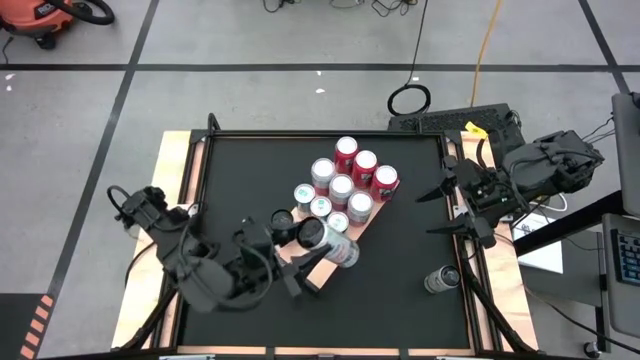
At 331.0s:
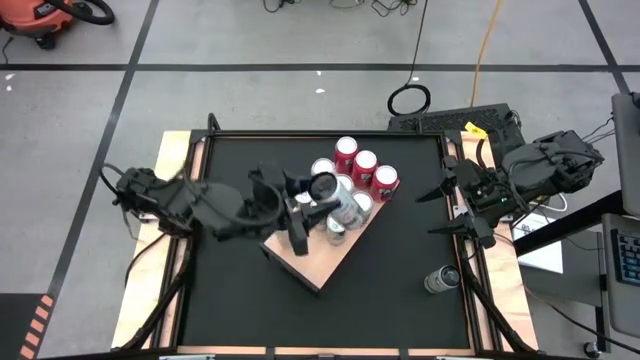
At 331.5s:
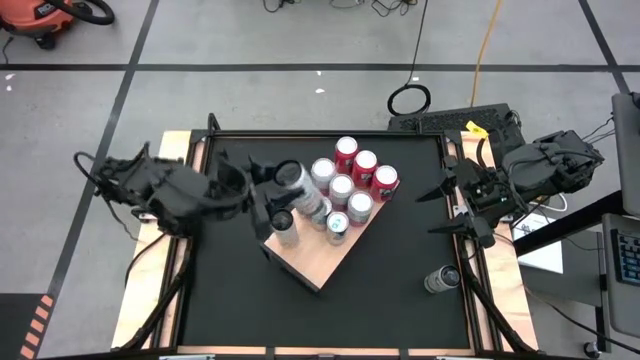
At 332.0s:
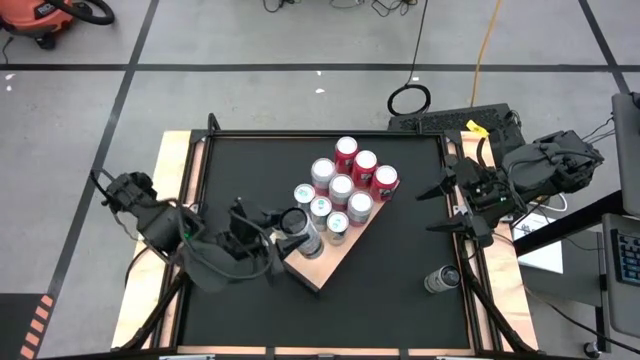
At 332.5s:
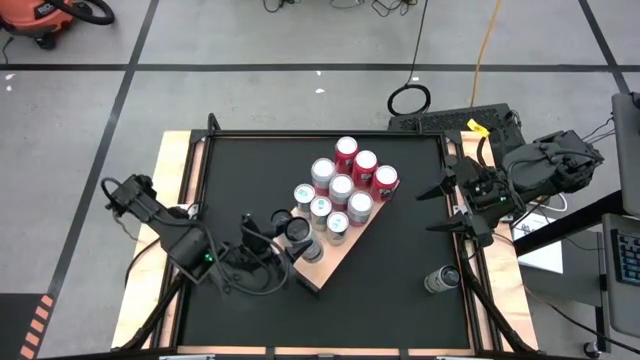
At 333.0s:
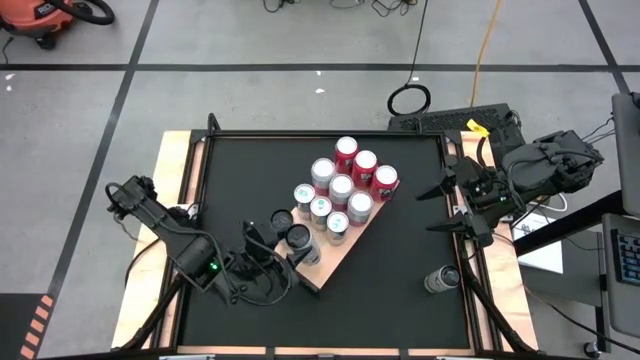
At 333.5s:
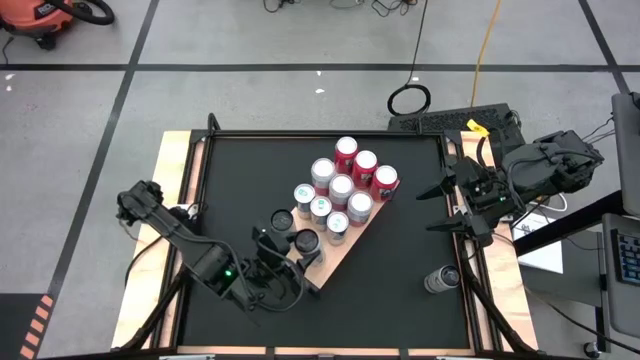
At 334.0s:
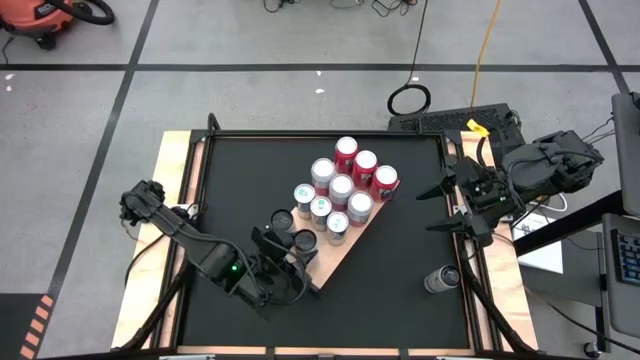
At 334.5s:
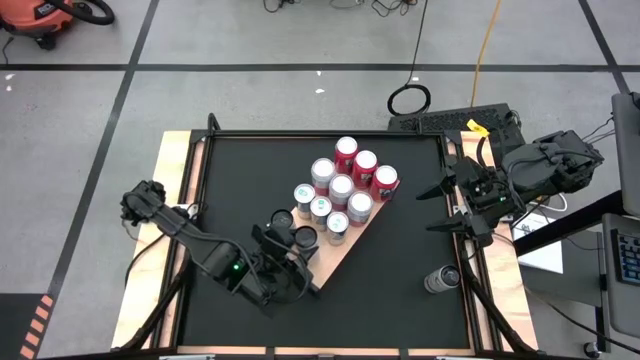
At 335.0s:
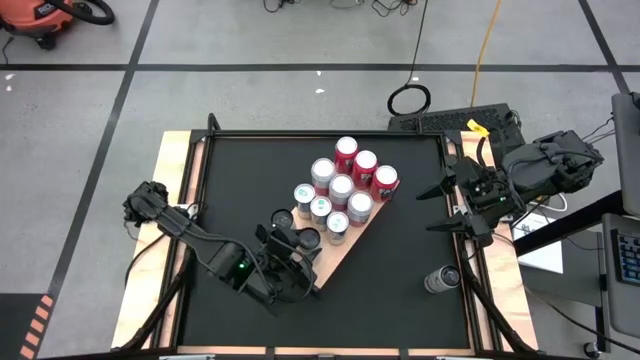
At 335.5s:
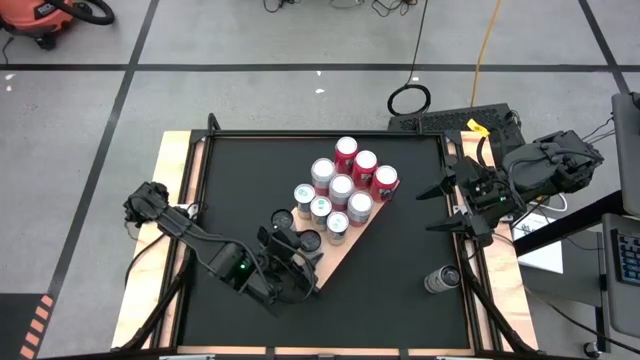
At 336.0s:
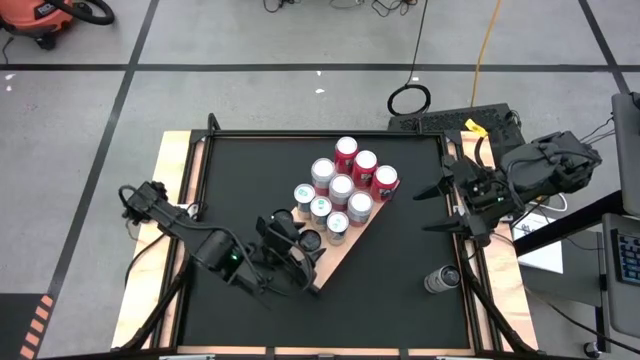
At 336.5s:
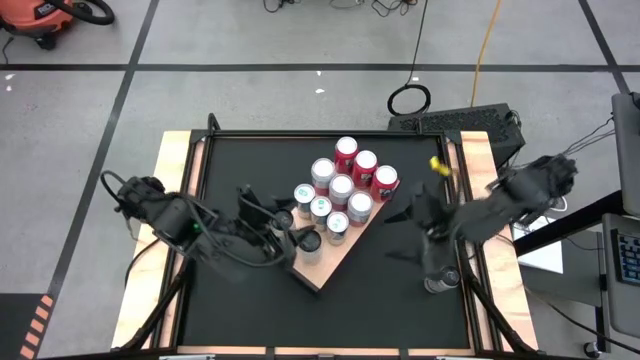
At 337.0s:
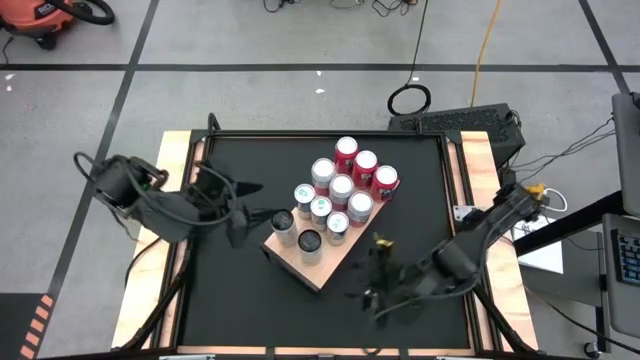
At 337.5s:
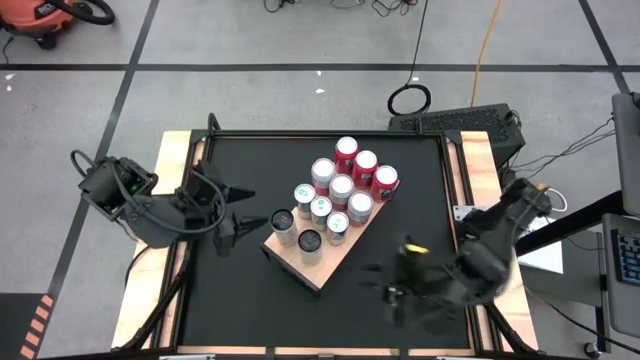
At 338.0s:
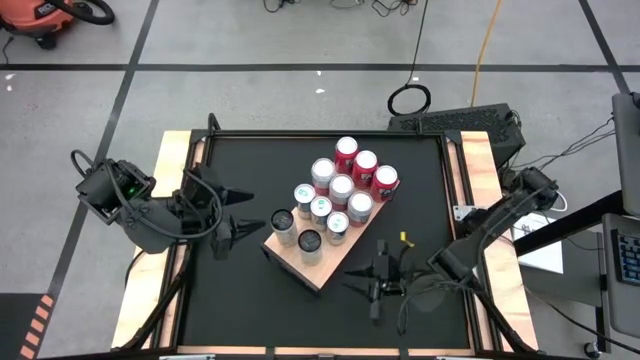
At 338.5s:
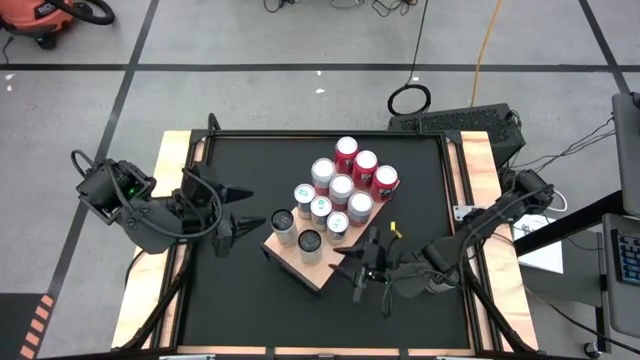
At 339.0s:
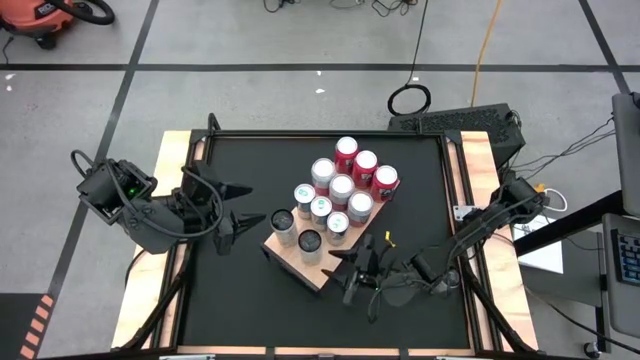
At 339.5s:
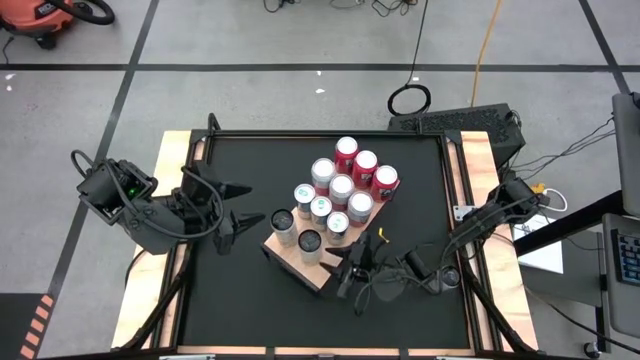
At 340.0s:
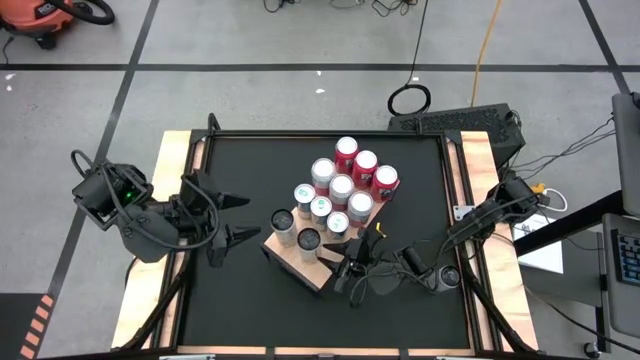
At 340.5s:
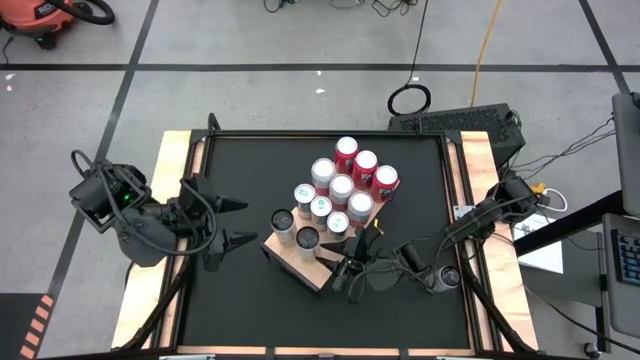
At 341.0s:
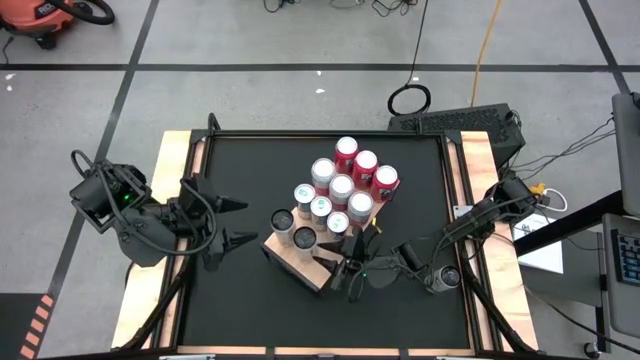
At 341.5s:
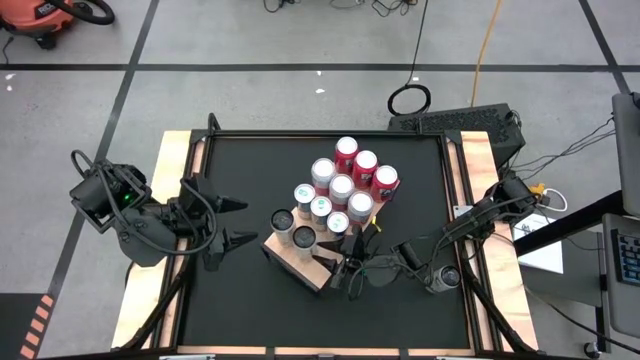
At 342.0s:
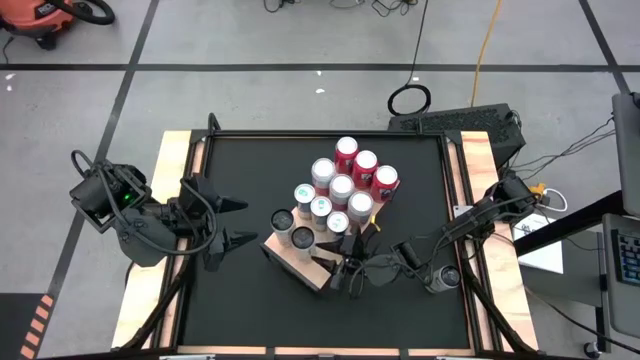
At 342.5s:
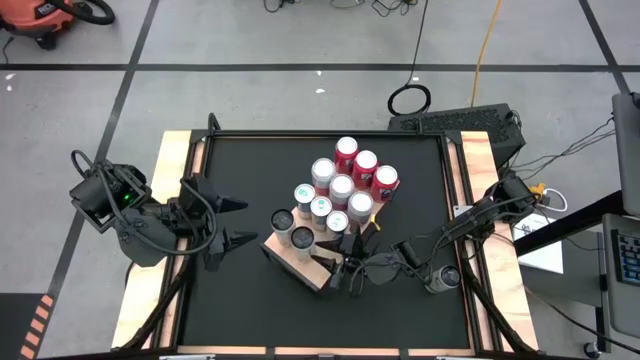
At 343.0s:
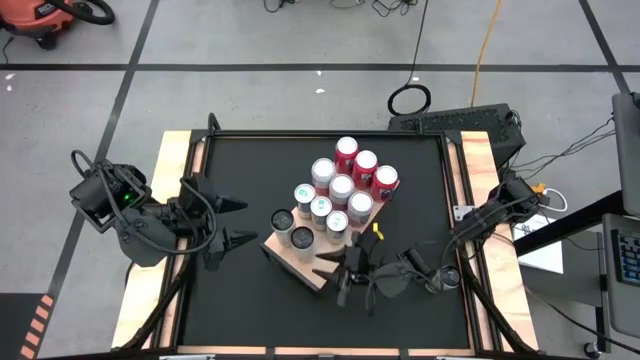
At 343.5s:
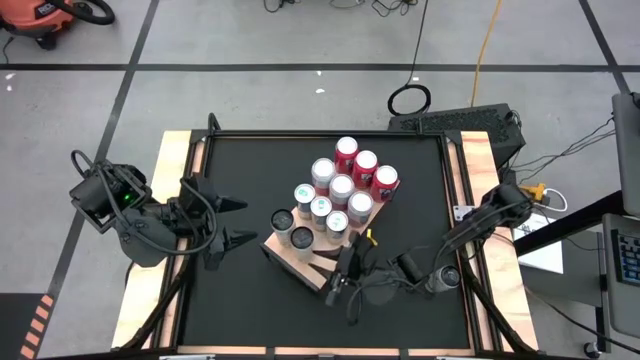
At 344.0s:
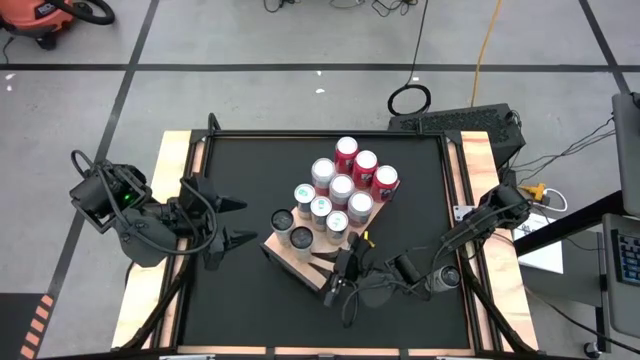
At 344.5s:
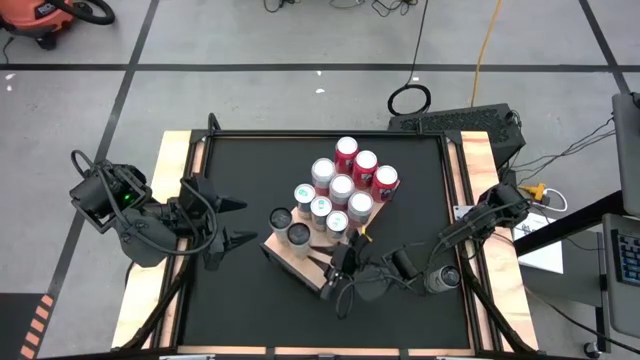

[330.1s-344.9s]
Task: Place canned beverage on shelf
Put the bottom white-yellow soda can on the shelf aligned with the white-yellow soda can

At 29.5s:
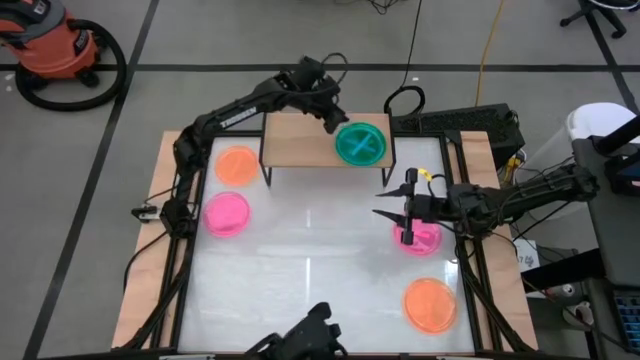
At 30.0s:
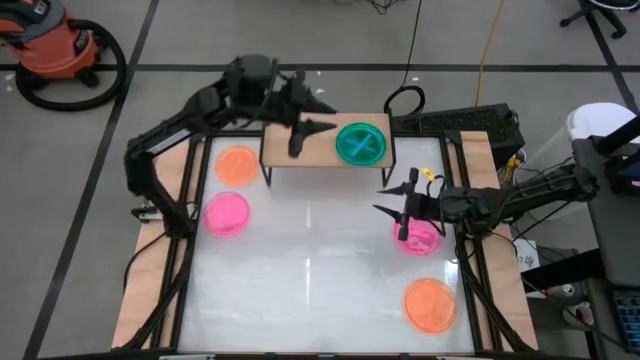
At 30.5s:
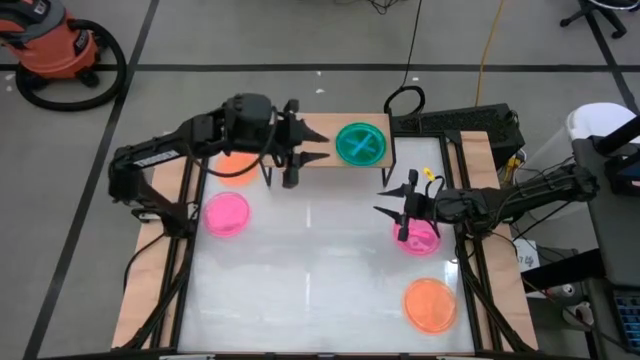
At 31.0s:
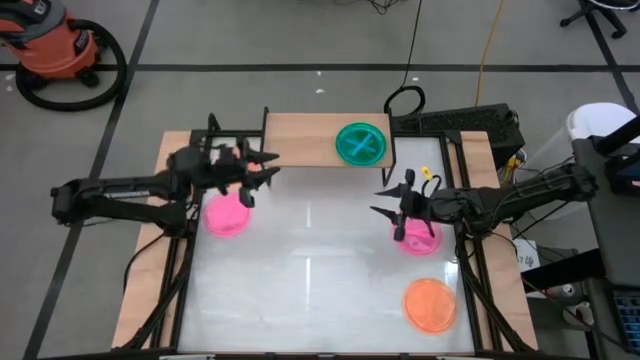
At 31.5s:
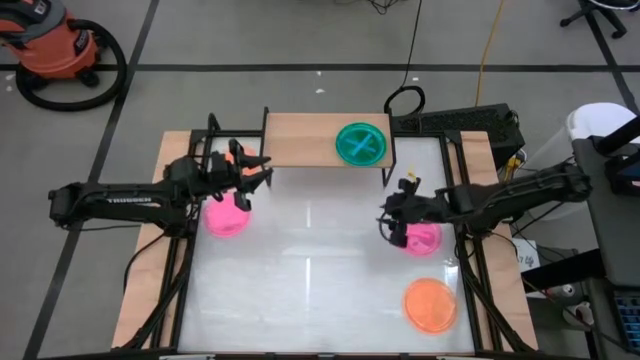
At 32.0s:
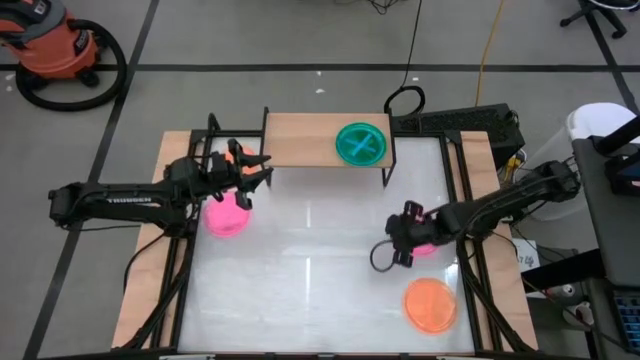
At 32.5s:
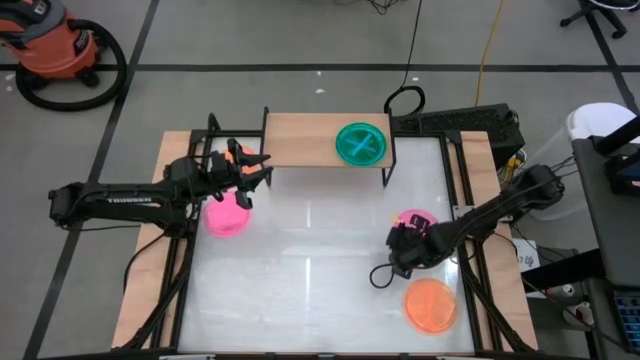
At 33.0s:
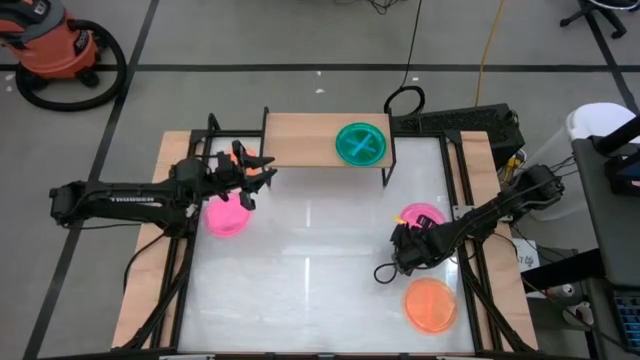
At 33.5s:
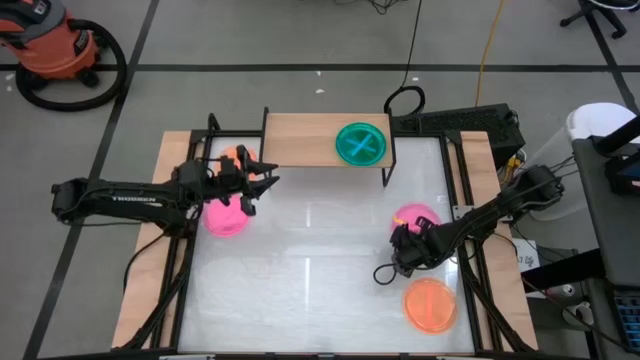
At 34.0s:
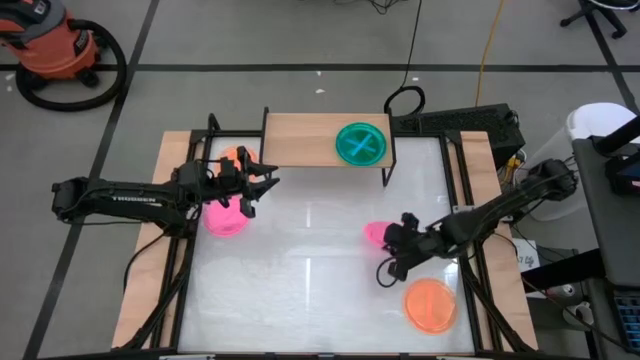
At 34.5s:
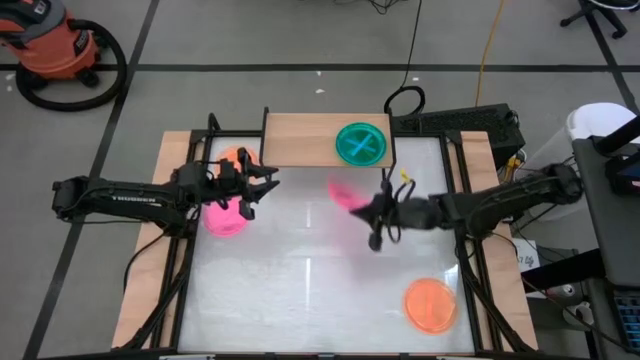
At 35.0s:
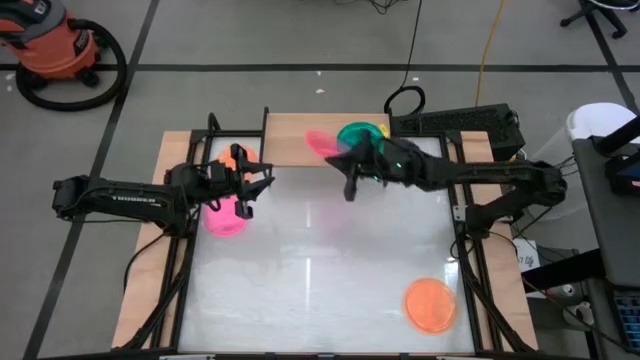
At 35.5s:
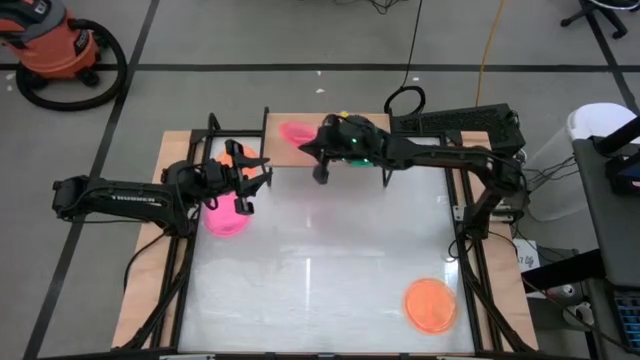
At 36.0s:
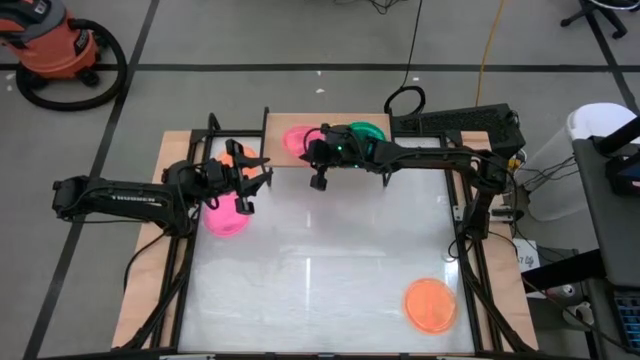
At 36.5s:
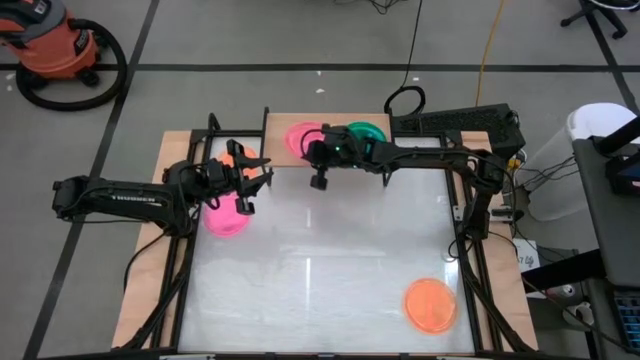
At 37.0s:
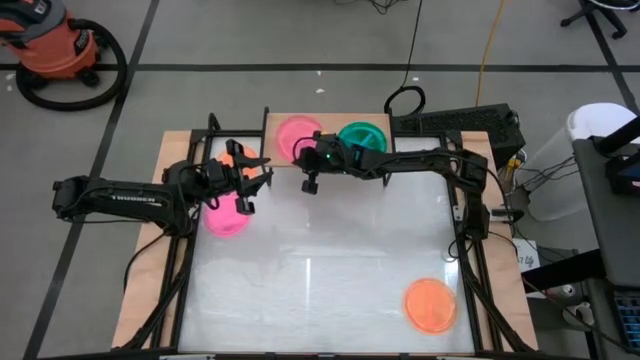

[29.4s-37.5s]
Task: Place and stack plates onto a shelf
Put the right pink plate on the shelf
